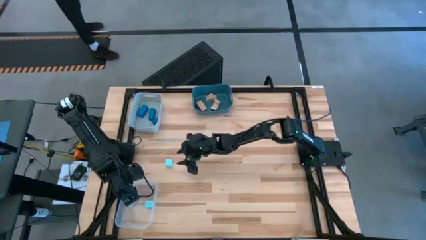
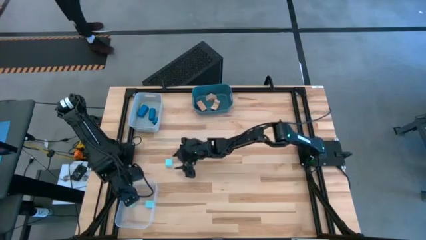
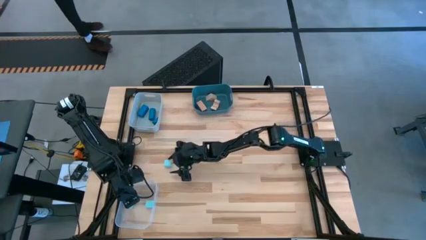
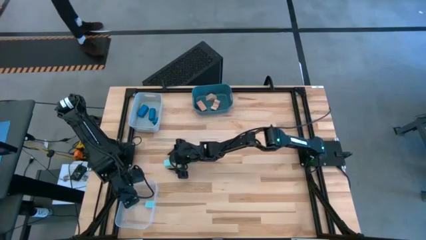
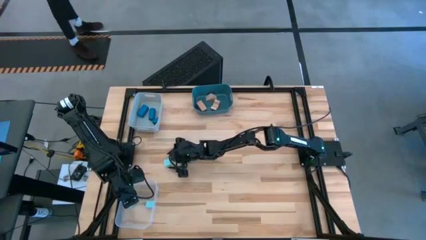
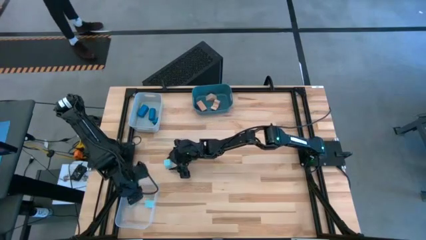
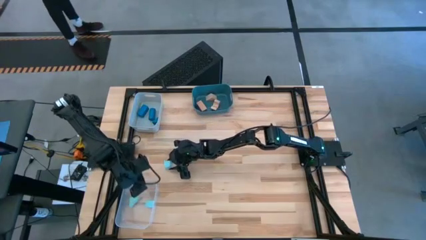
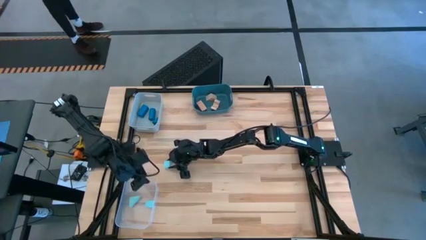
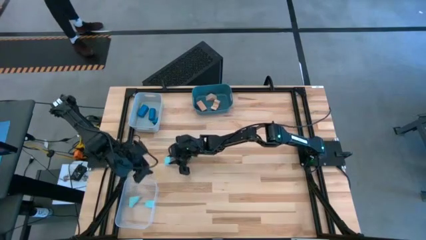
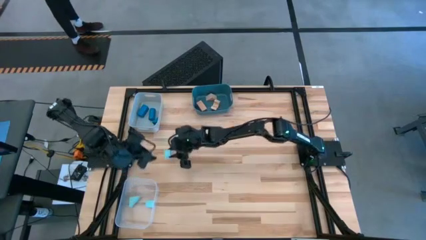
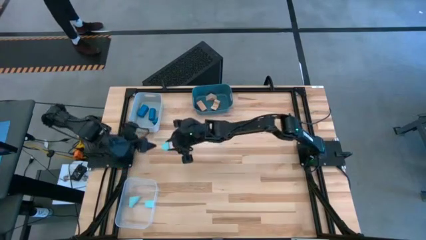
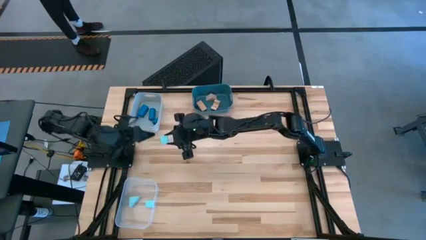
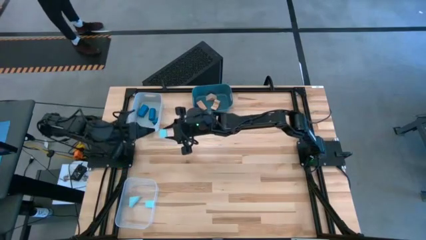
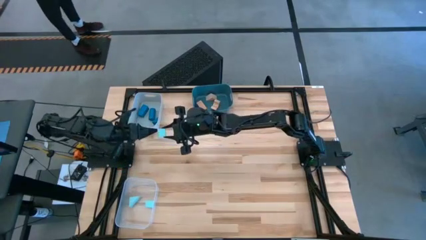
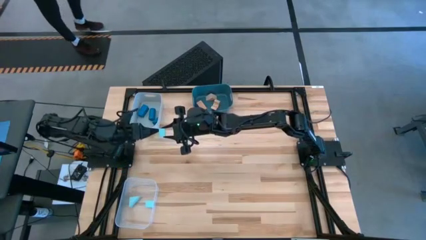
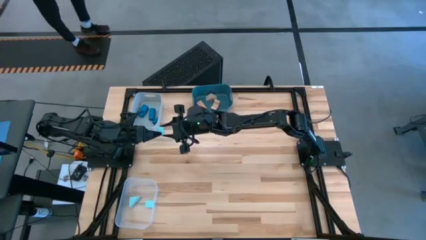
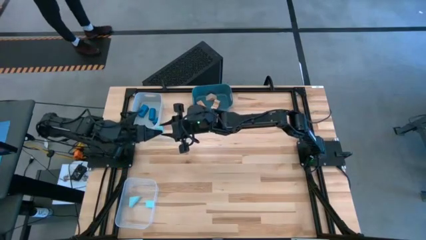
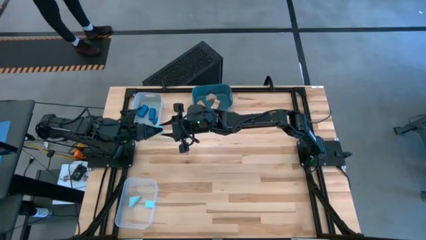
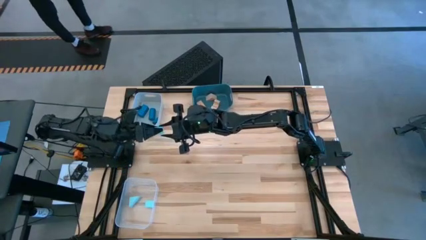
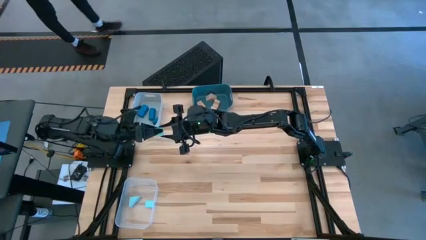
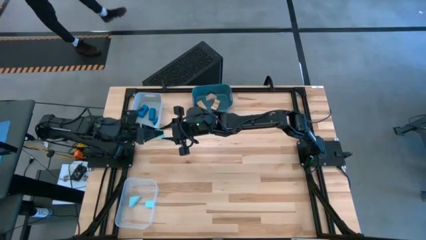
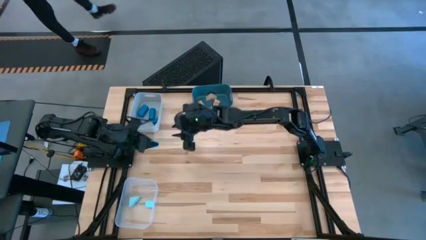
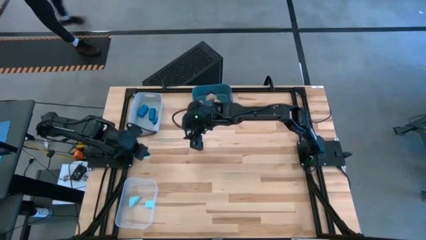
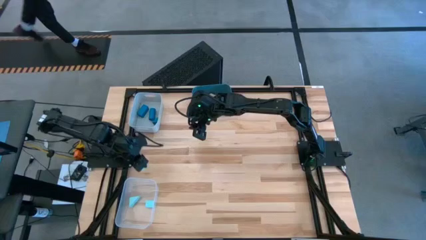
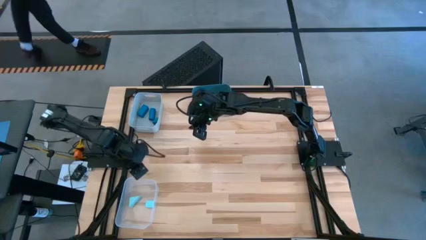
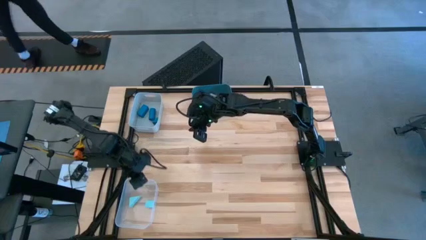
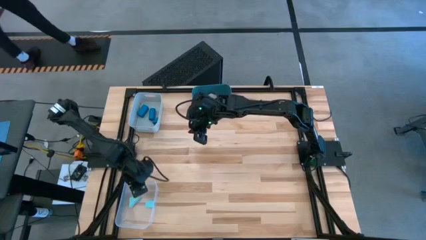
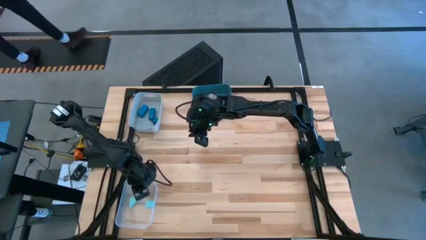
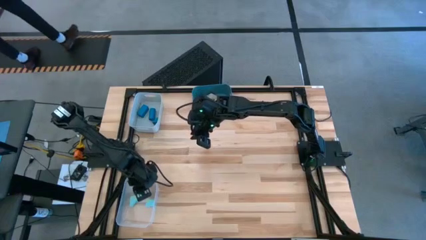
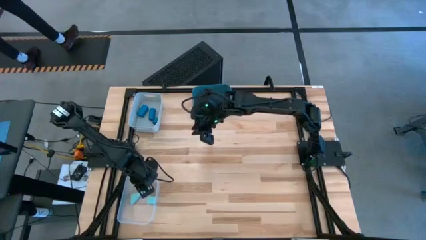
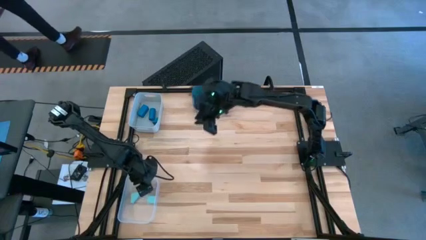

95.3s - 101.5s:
Task: Sort & place blocks by color
Put the light blue block into the transparent bin

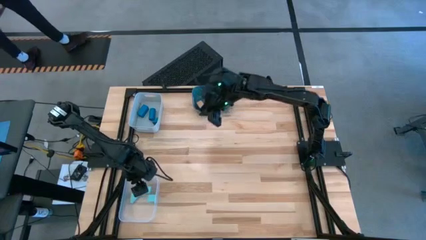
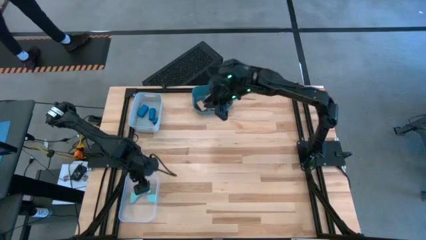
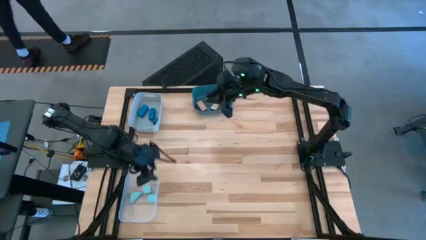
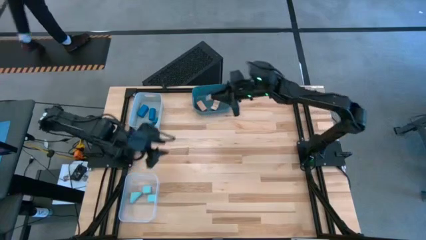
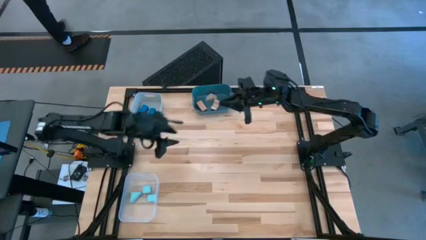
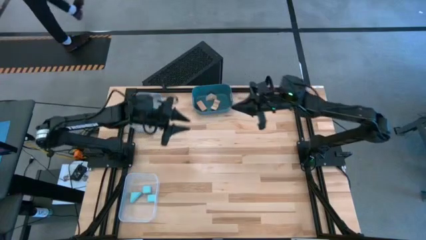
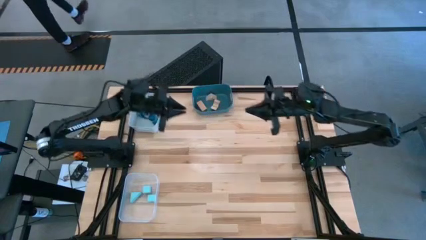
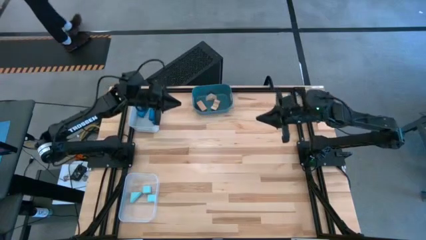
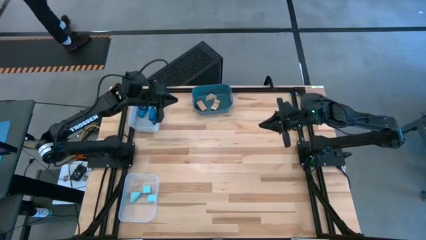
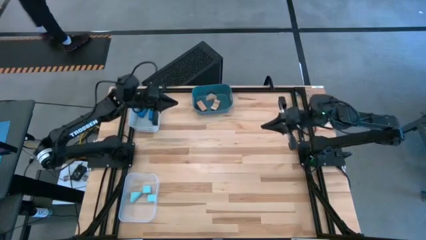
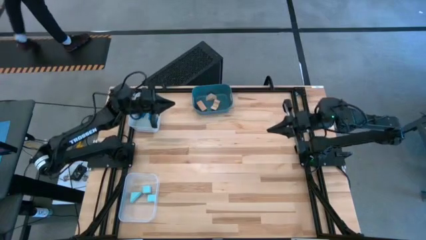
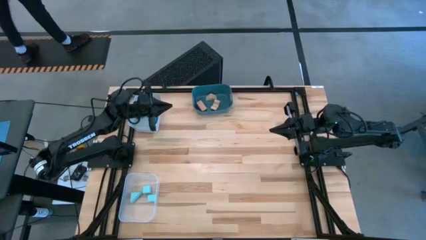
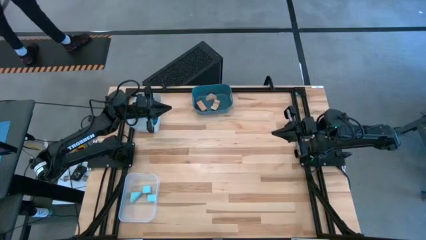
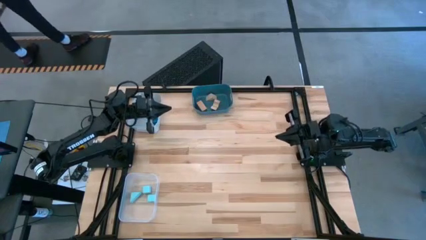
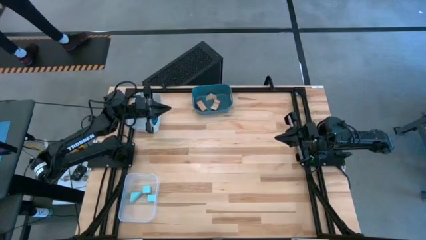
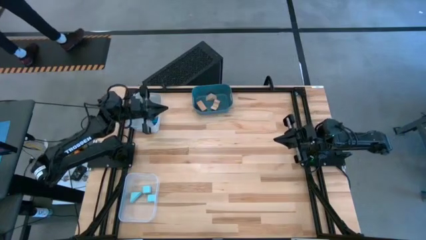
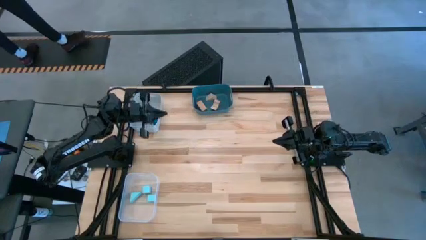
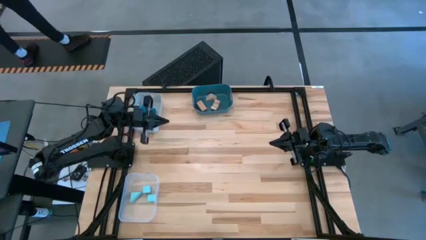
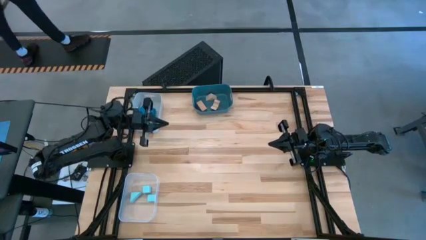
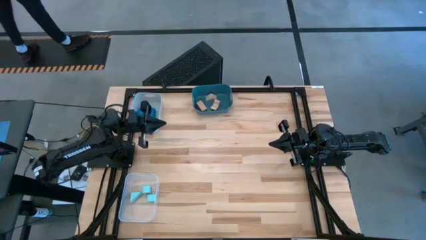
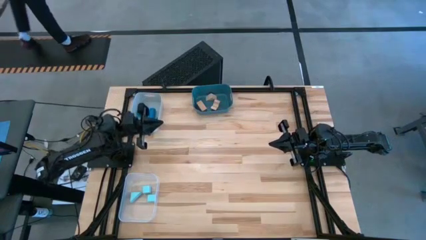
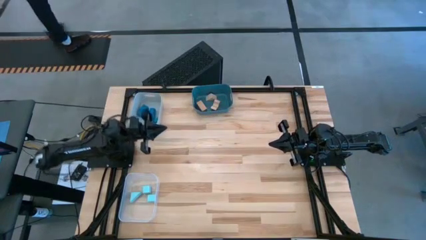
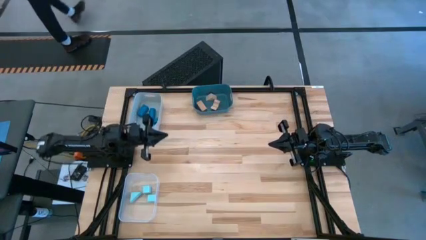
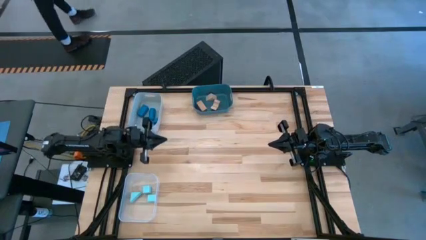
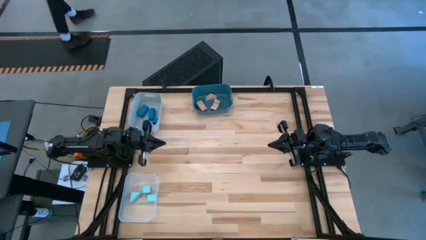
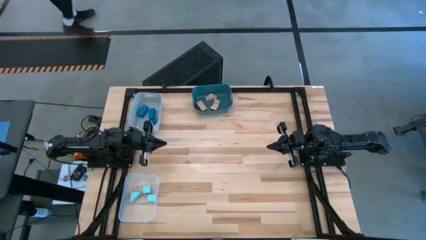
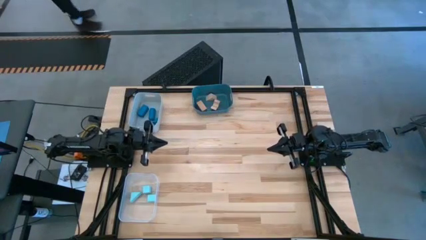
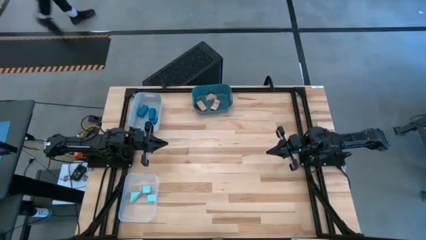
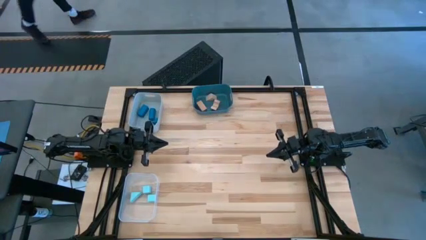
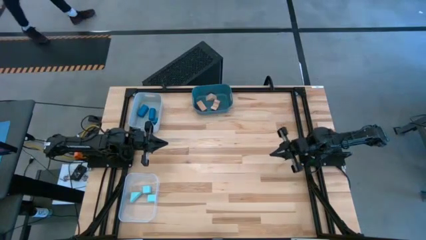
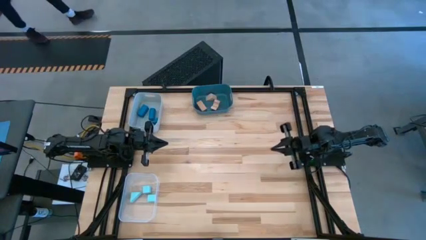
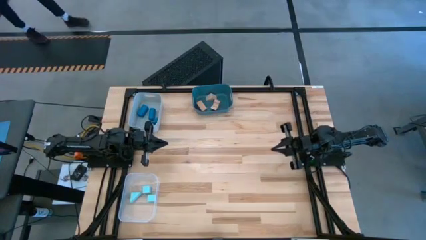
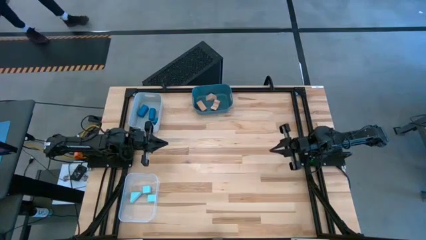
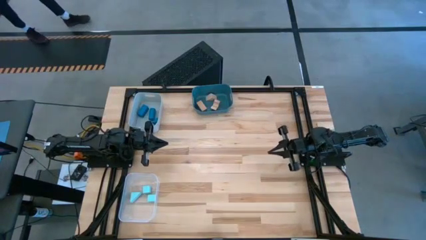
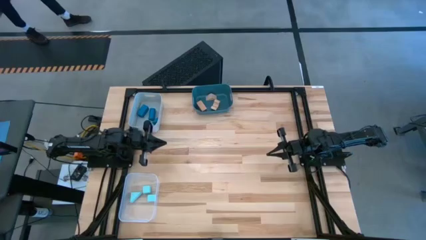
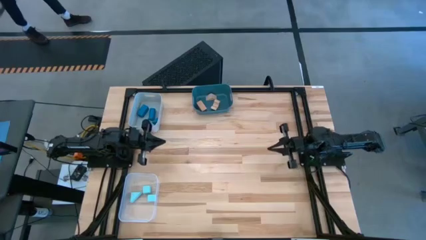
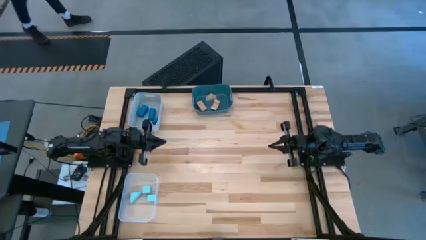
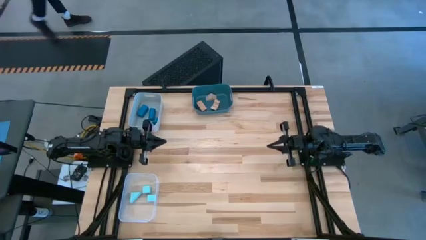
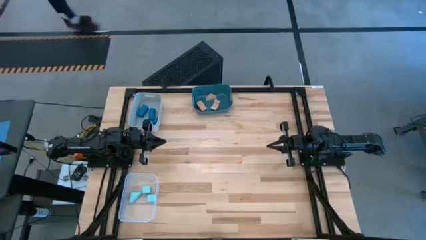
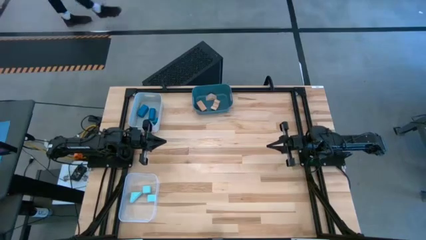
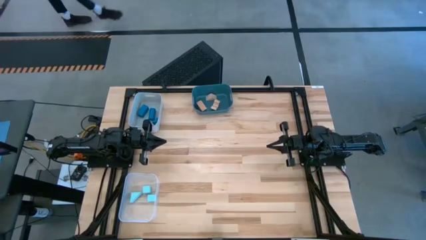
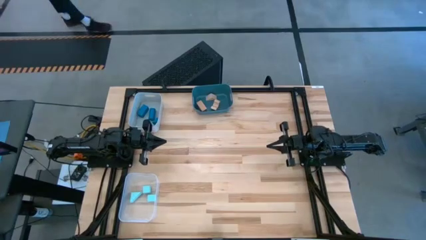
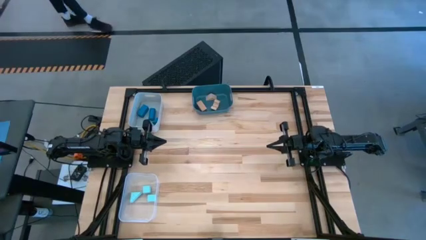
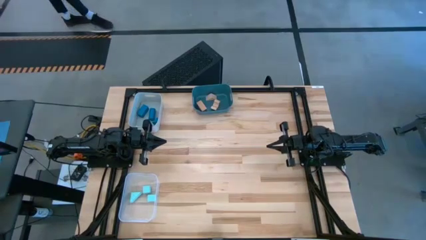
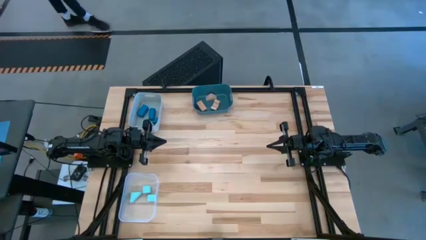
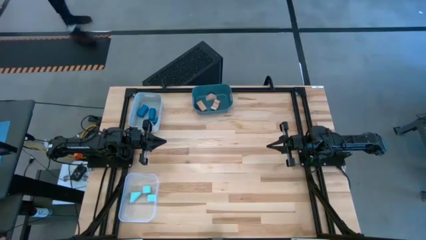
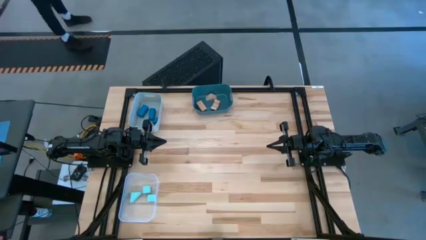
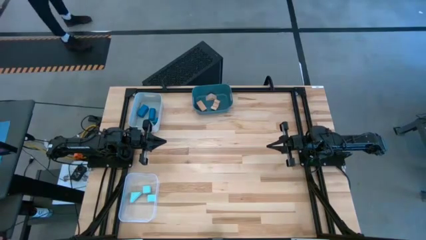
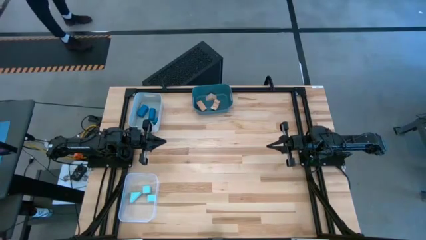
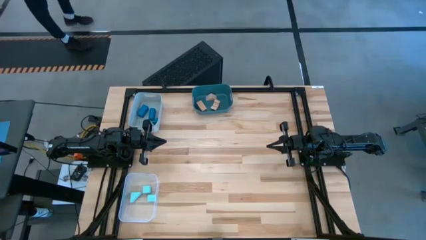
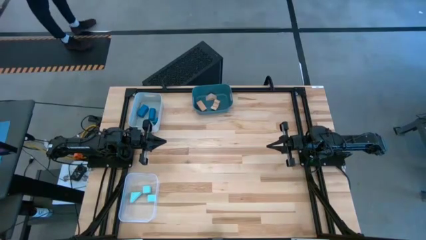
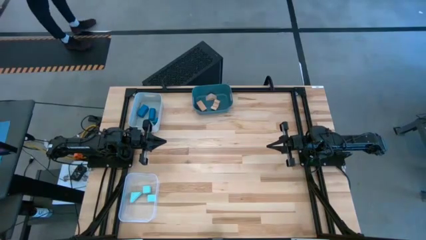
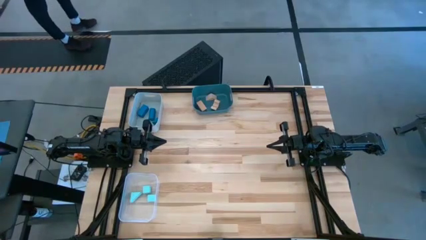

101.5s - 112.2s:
Return to Home Position
